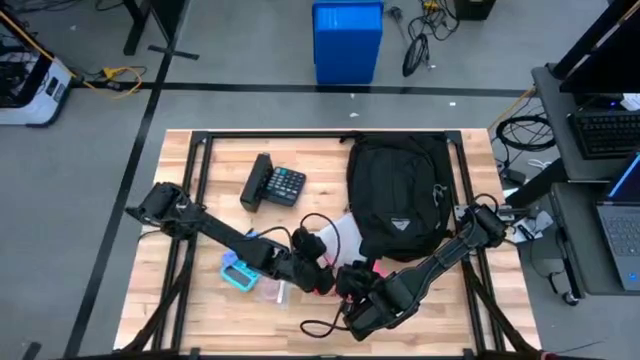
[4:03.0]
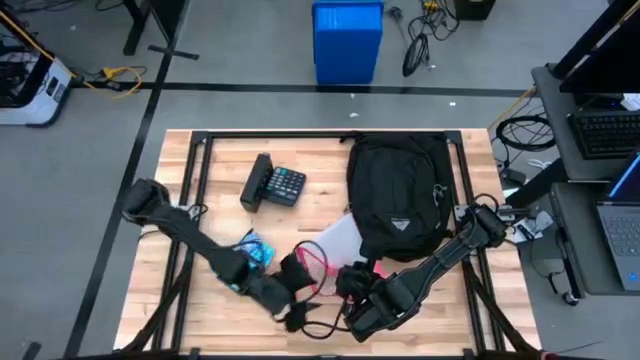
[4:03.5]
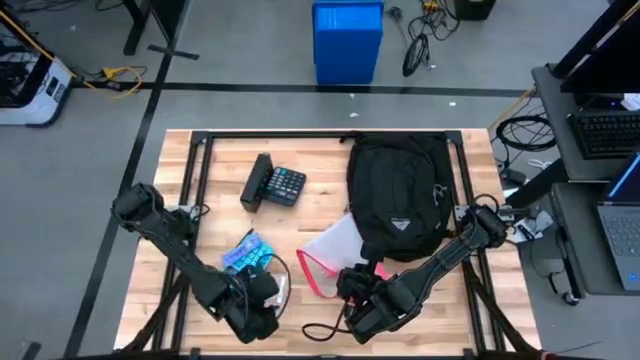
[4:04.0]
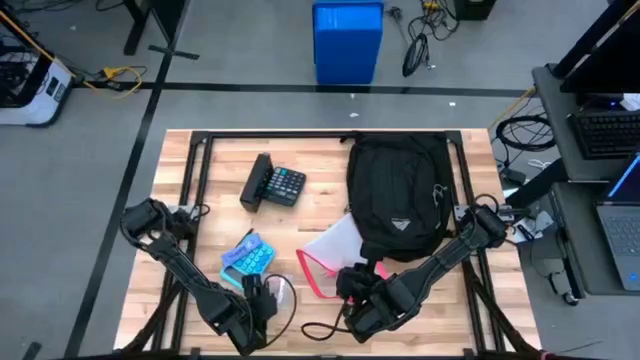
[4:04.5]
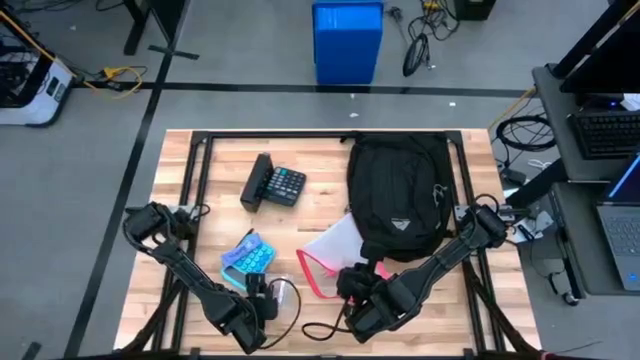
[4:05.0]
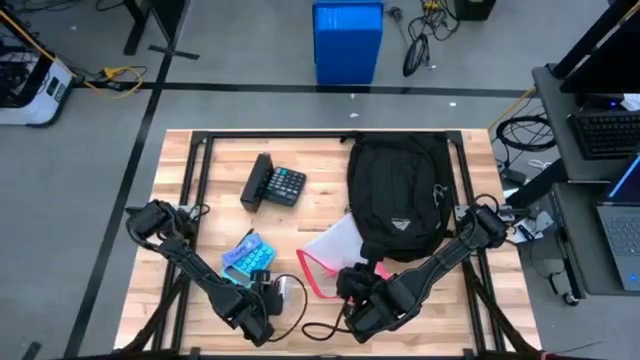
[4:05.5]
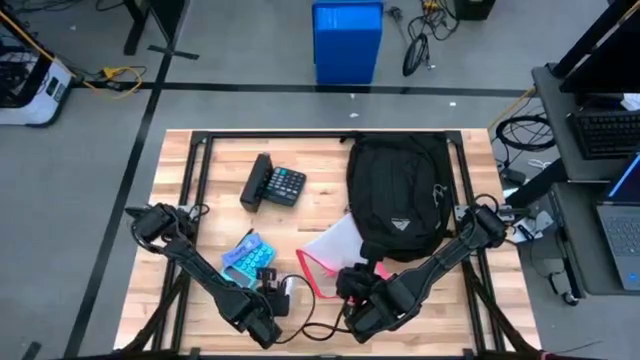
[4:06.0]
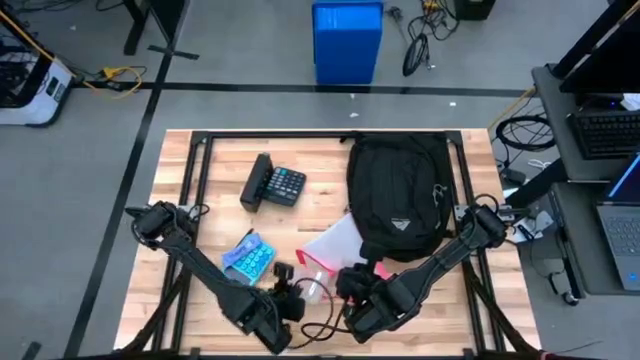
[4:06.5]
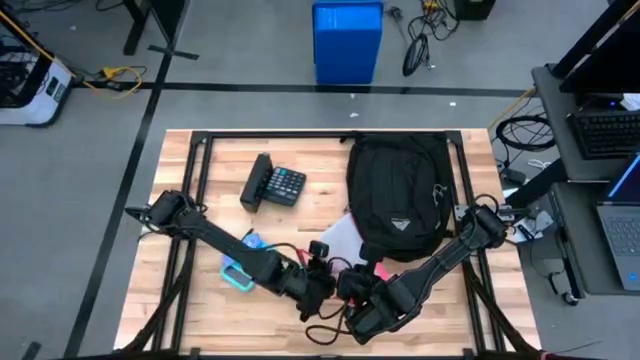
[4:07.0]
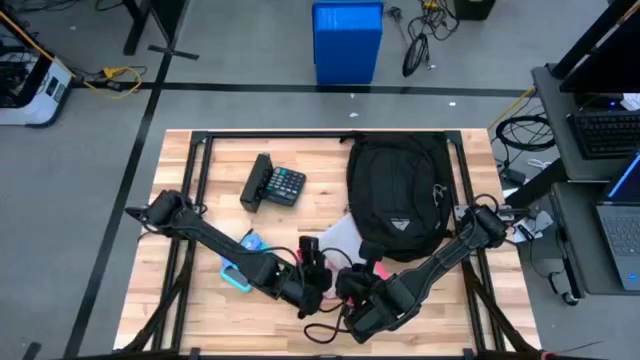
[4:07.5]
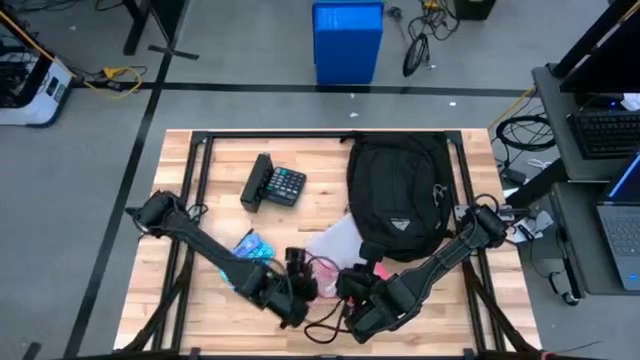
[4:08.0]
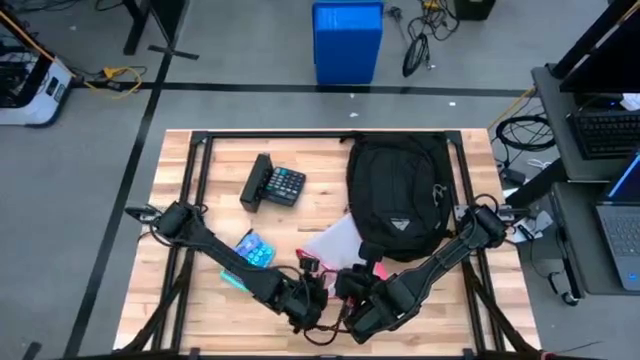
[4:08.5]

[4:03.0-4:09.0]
Task: Unpack backpack
Put the pink earphones into the white zip bag

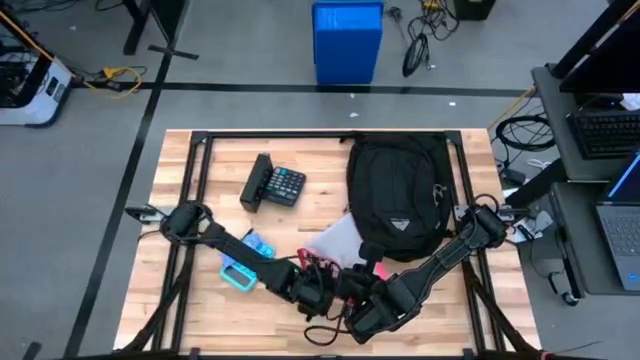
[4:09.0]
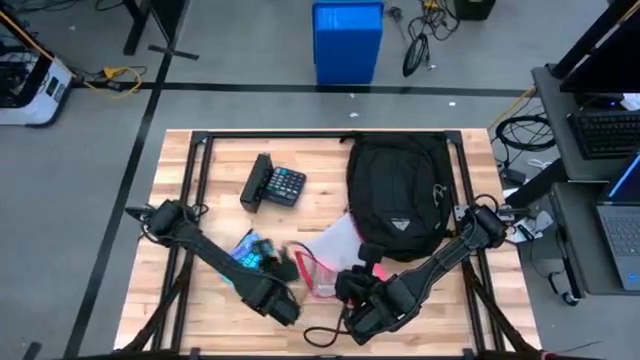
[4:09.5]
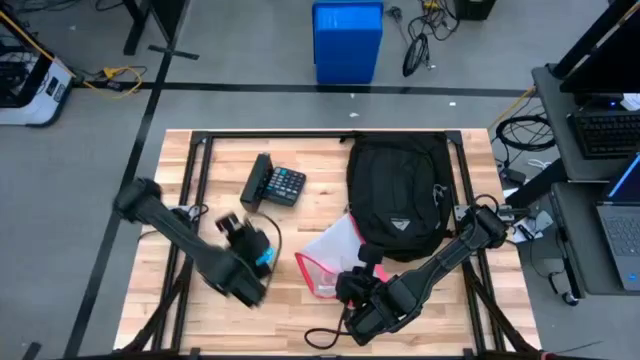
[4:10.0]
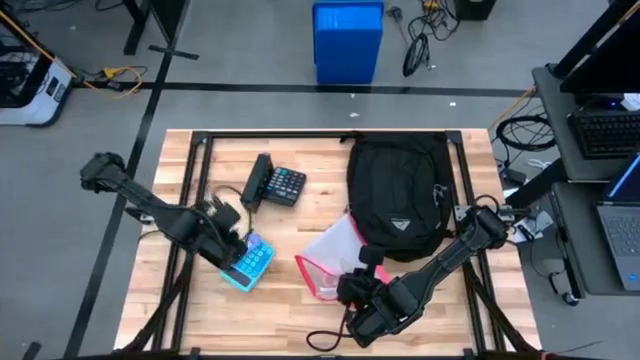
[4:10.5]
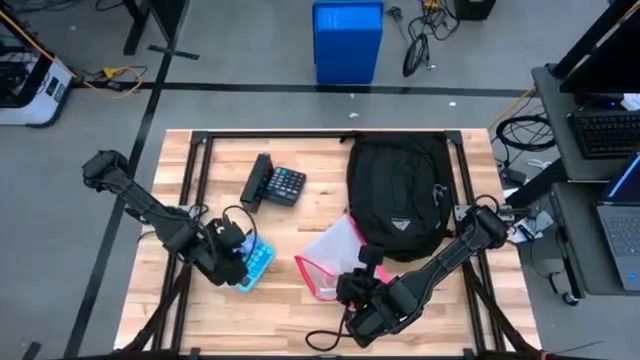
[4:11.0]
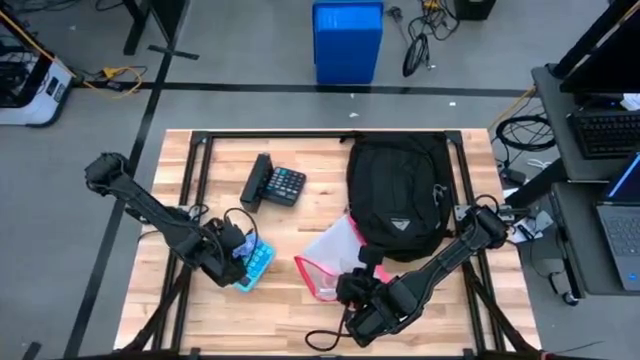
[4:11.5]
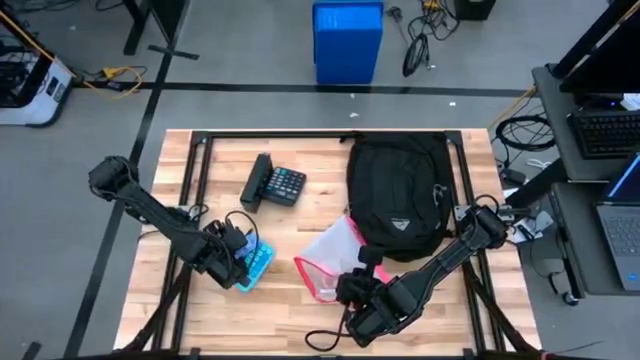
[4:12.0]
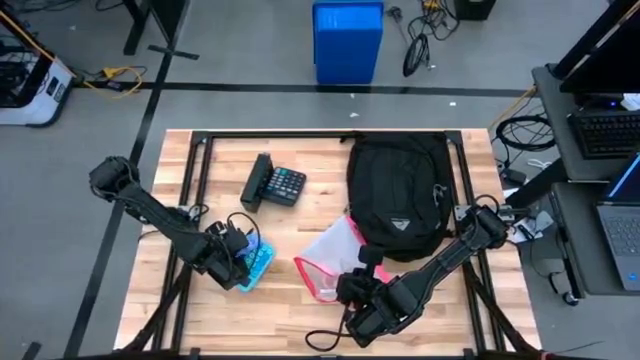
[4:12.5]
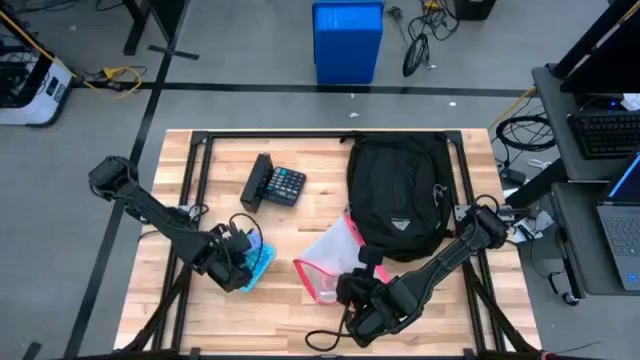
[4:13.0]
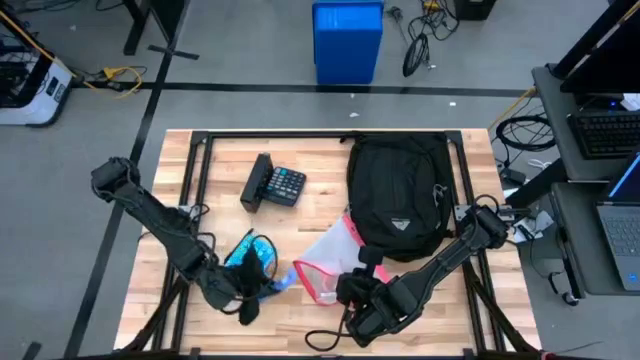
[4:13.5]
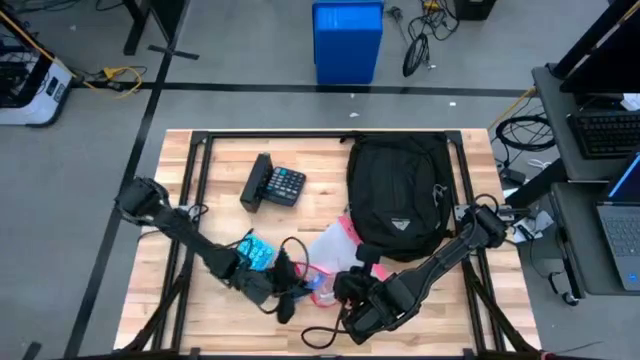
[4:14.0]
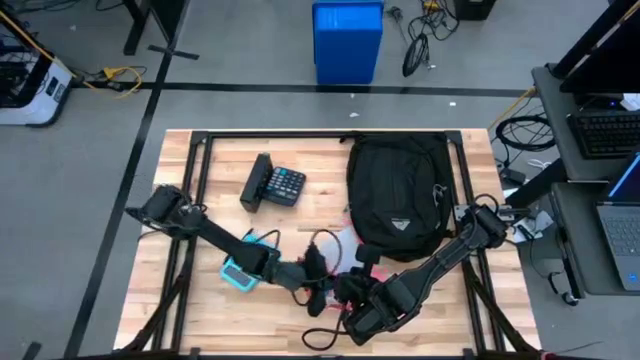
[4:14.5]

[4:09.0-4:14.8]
Put the violet chocolate bar into the white zip bag

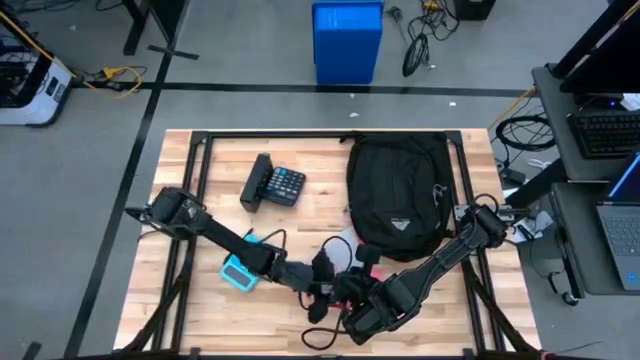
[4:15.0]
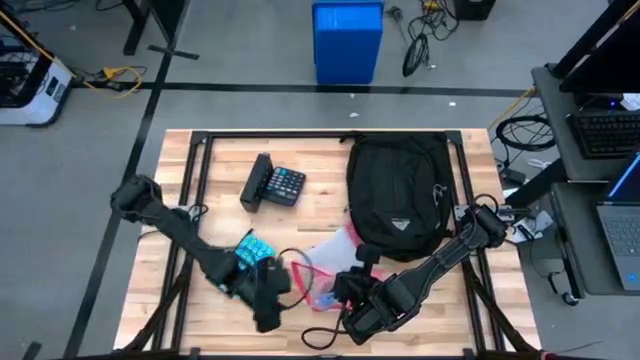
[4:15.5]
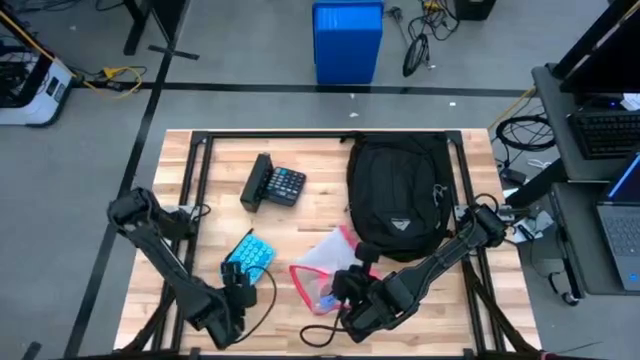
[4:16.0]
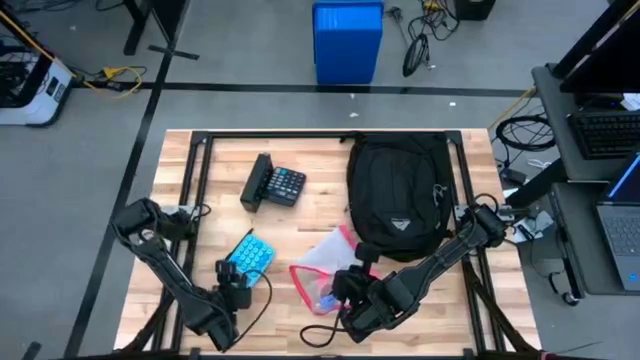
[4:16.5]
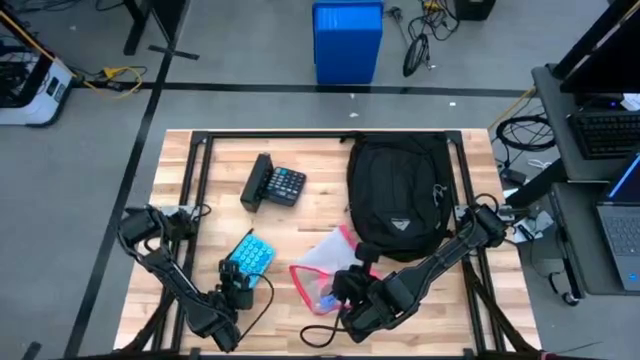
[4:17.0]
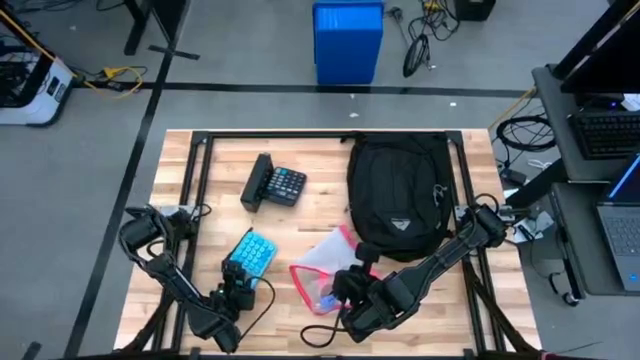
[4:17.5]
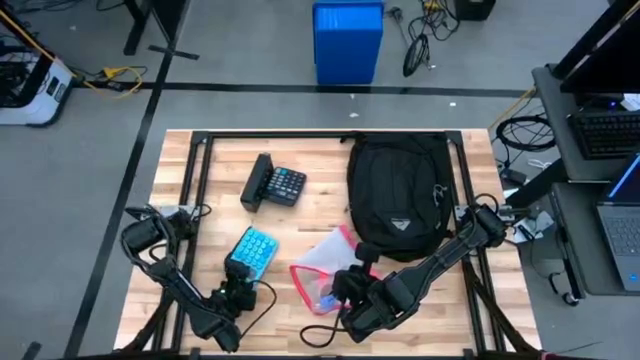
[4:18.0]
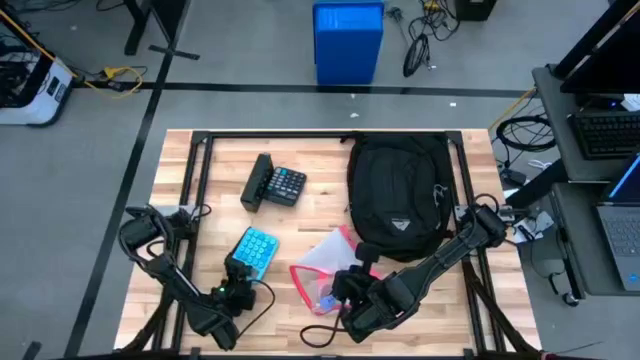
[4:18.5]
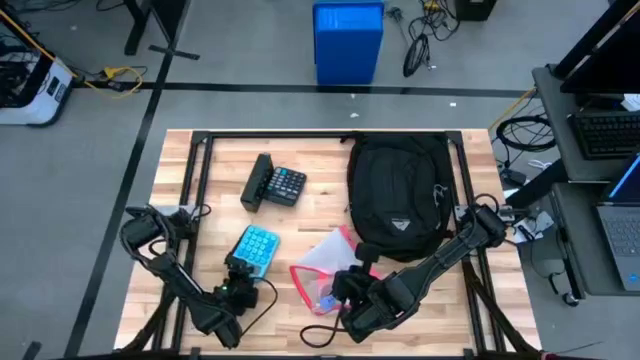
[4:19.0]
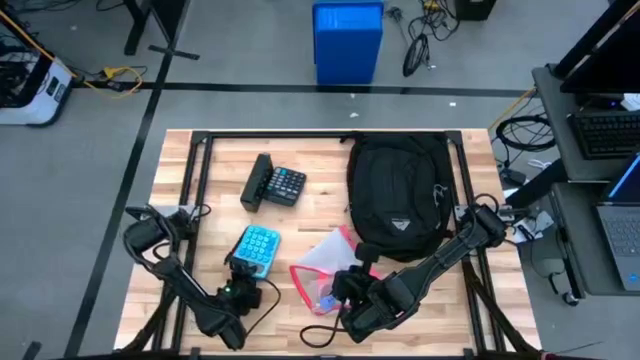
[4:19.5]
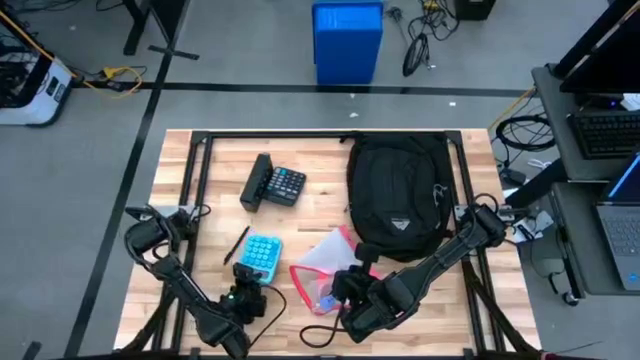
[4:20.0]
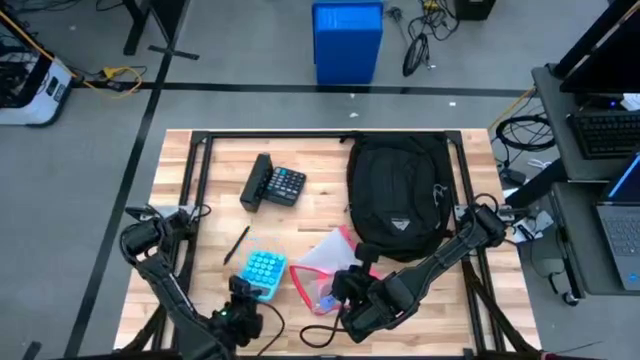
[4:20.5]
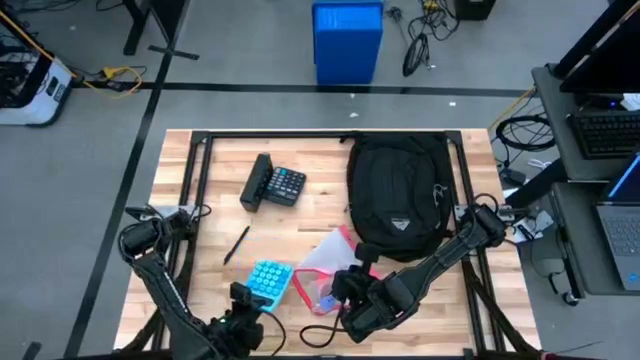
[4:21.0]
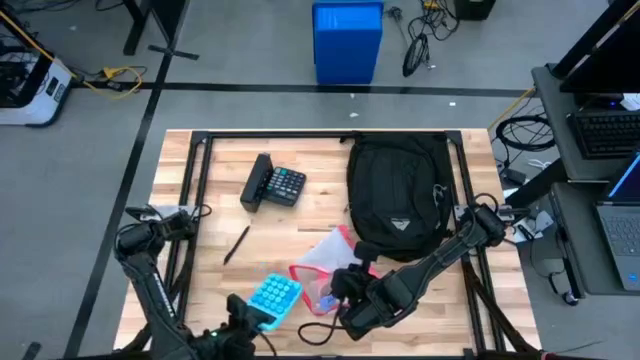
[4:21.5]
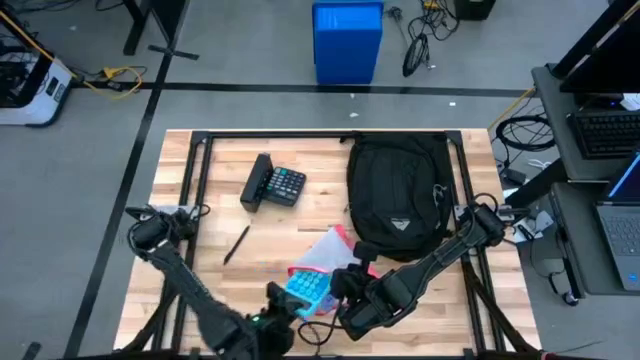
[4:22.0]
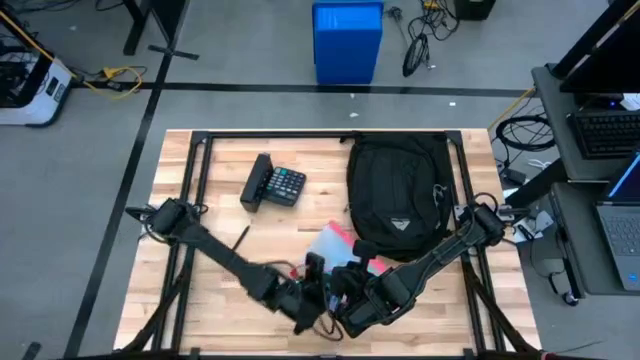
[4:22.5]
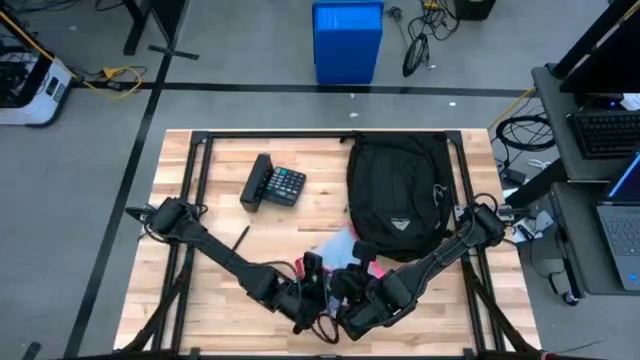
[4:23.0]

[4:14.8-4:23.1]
Put the blue calculator into the white zip bag

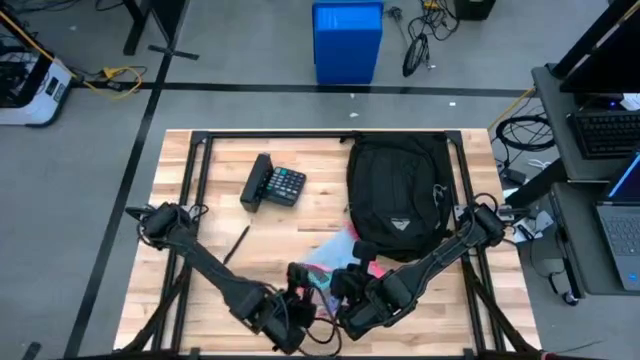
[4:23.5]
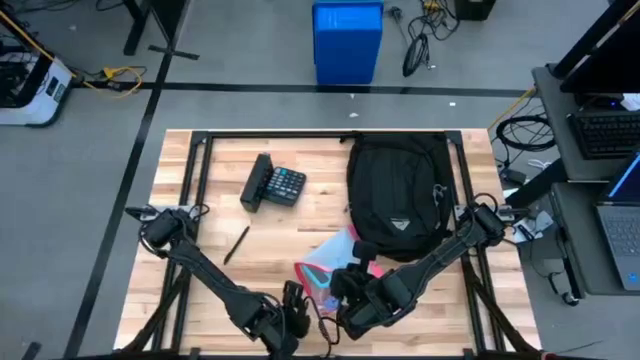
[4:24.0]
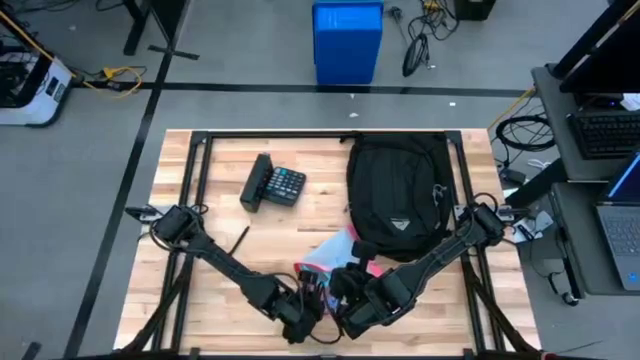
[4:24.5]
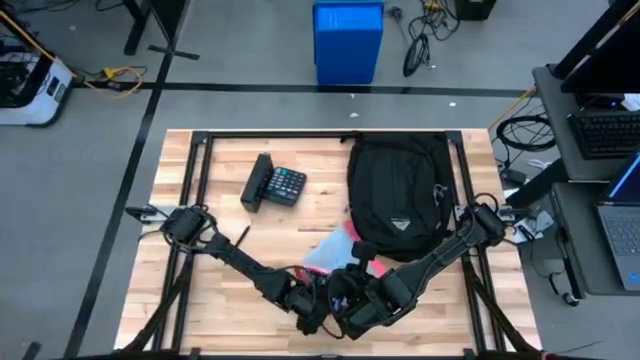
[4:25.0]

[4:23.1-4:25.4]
Adjust the pink earphones in the white zip bag
